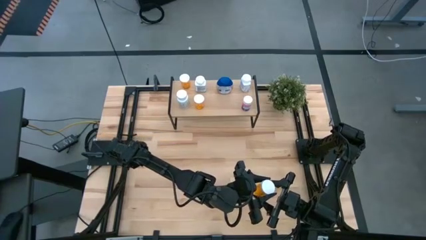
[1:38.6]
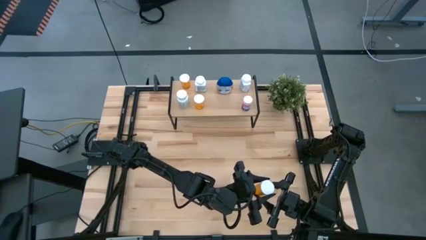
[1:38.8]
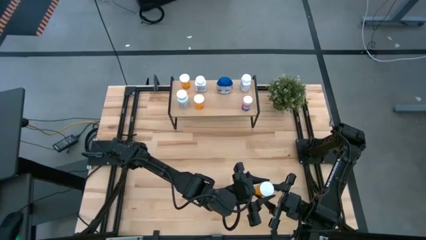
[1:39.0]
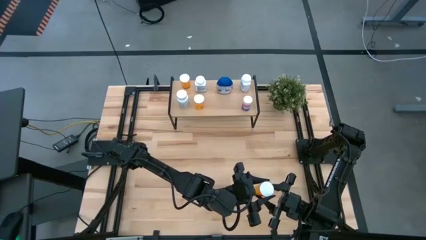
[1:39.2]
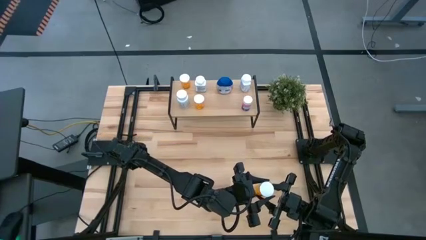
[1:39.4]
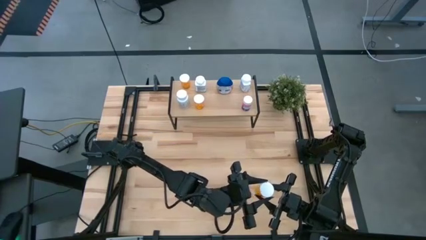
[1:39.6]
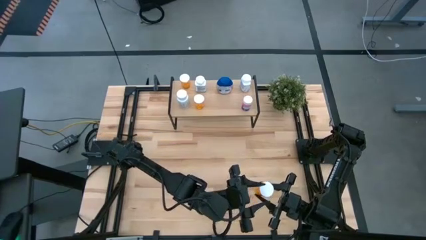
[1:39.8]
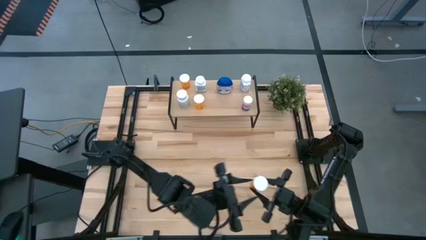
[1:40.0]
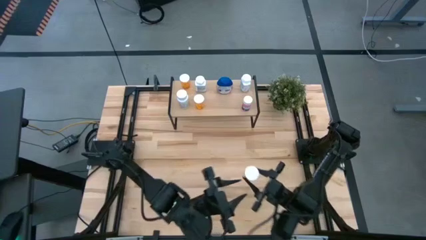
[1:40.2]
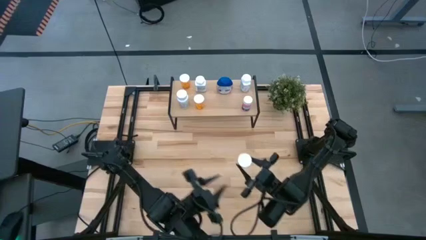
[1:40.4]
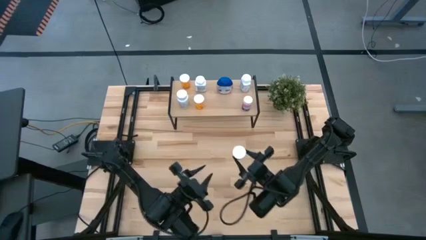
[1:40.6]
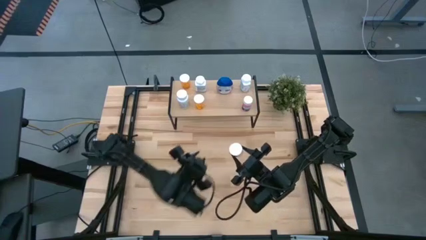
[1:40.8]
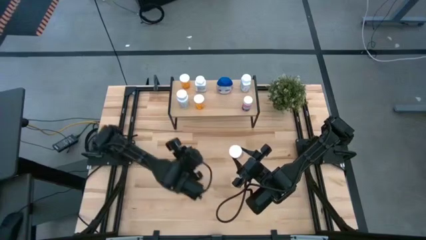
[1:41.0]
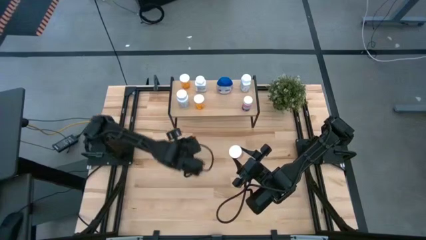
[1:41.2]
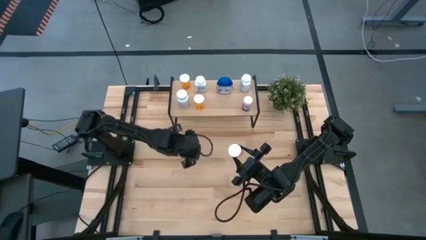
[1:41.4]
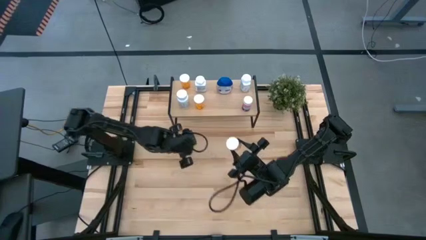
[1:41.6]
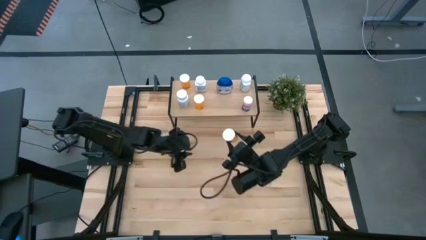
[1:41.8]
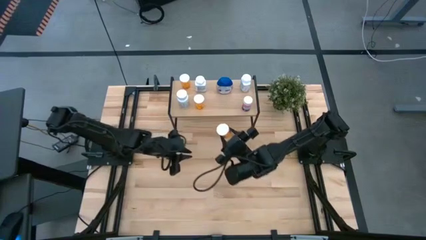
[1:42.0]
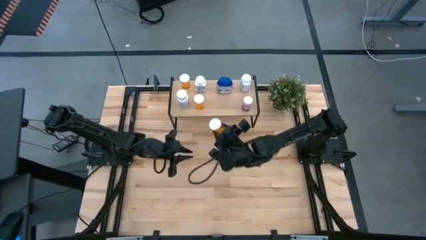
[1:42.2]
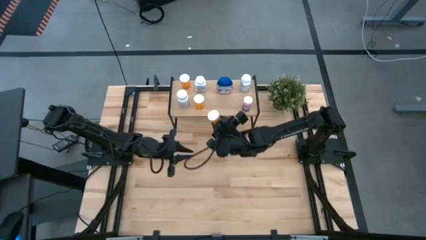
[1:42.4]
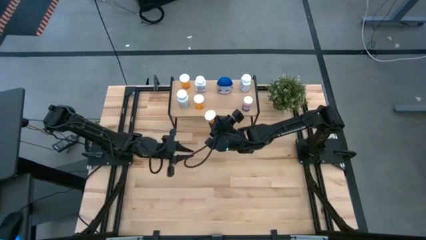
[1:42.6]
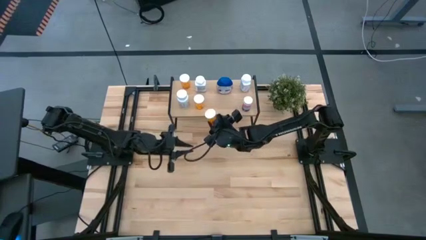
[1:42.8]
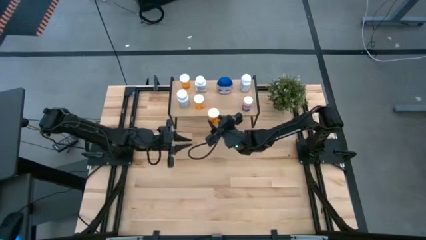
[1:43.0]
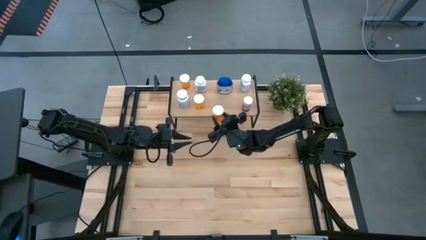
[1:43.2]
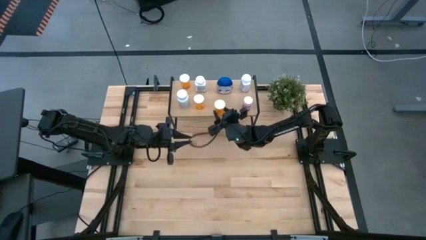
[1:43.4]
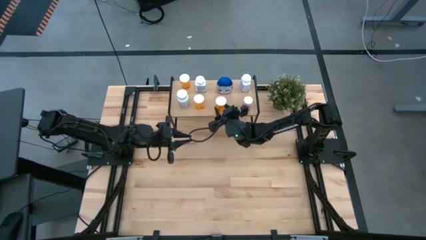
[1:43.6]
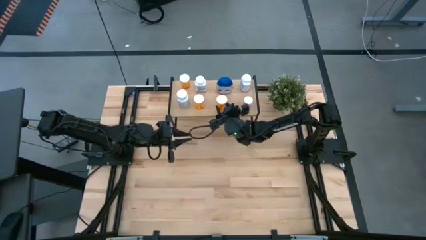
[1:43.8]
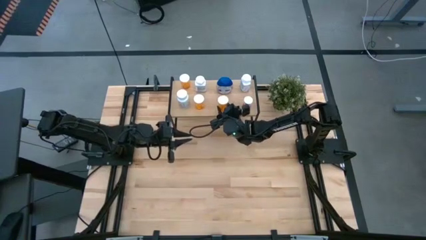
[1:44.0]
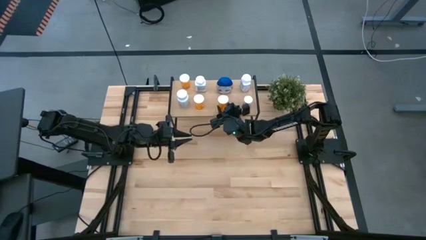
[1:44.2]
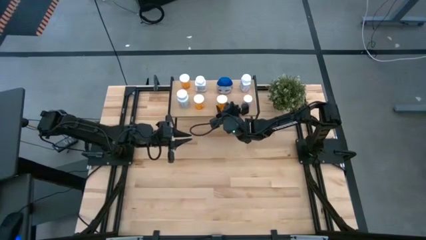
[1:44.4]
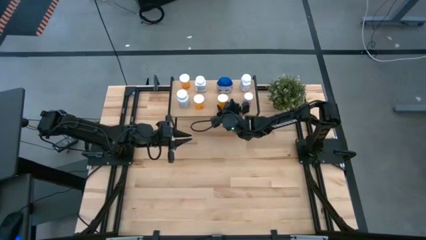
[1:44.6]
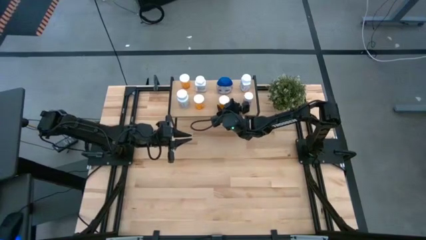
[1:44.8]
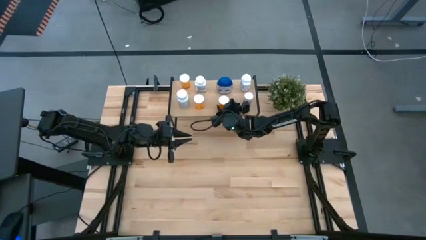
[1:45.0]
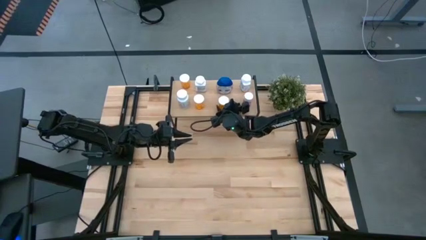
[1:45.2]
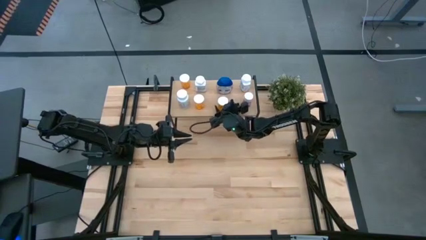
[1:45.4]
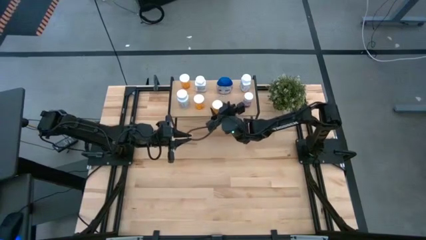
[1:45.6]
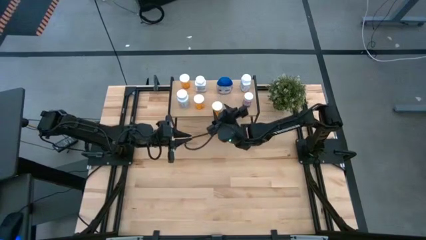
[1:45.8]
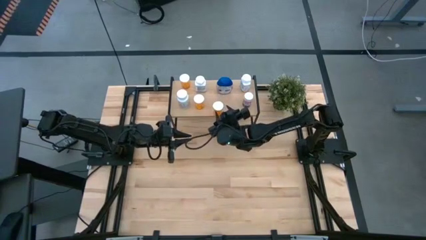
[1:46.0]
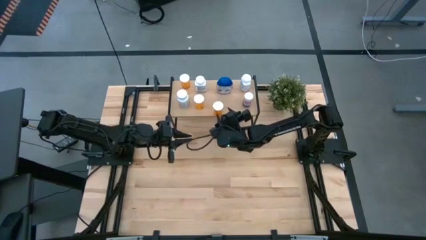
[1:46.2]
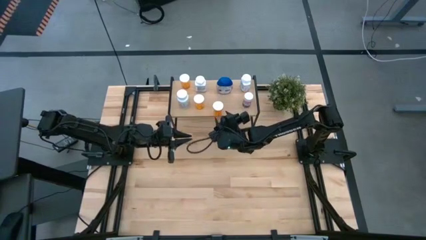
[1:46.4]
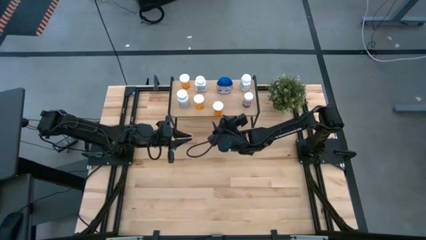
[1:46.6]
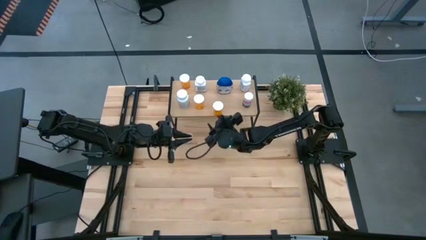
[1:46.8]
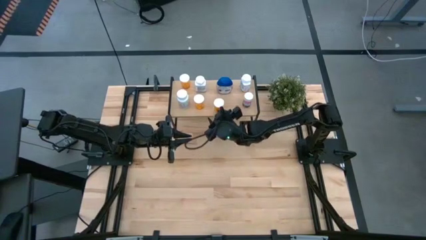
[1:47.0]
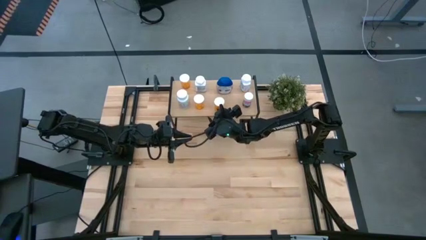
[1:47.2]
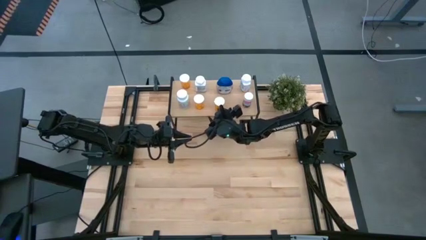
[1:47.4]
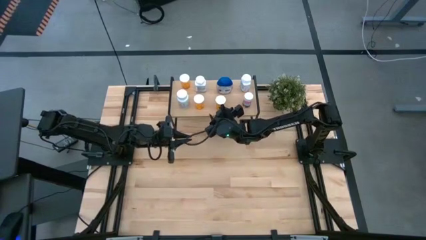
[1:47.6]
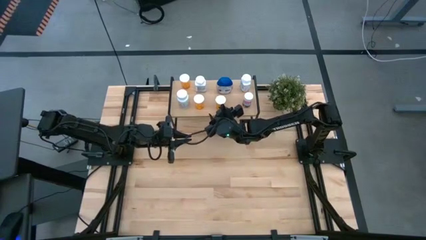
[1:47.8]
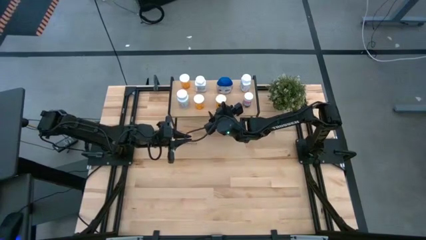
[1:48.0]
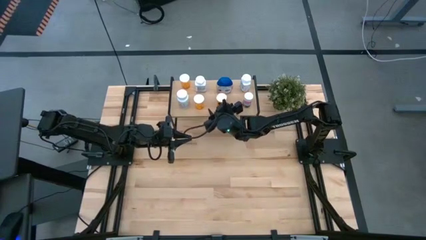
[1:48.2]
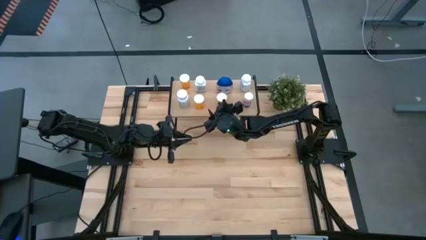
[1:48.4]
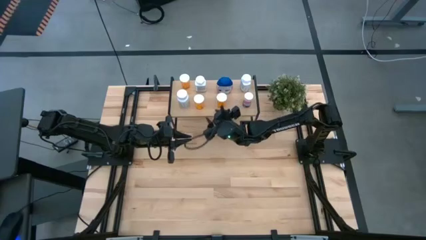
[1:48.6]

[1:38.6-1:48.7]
Task: Pick and place medicine bottles onto shelf by color
Put the yellow pill bottle on the shelf

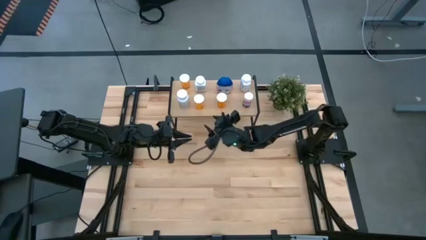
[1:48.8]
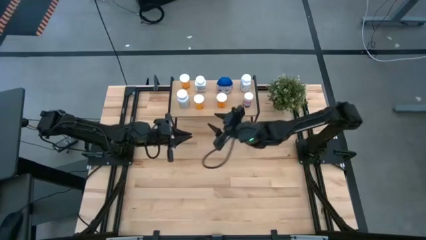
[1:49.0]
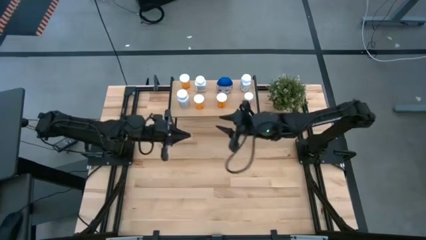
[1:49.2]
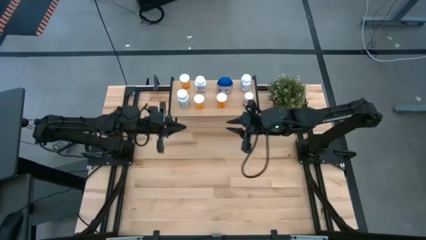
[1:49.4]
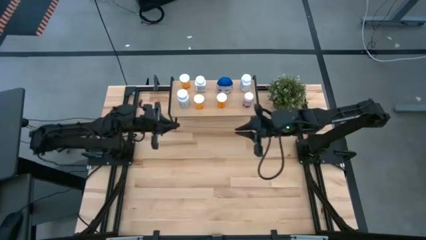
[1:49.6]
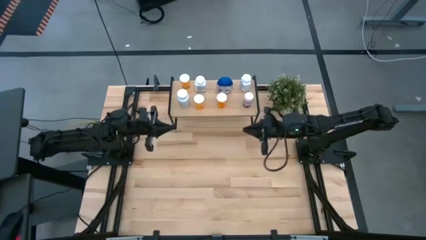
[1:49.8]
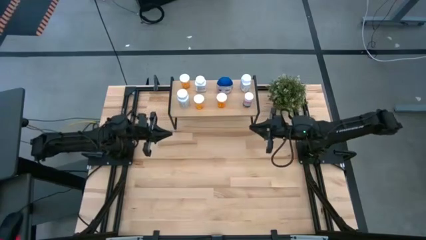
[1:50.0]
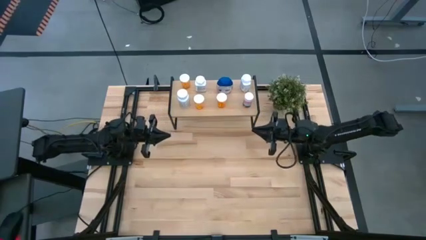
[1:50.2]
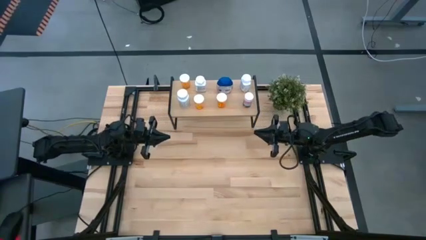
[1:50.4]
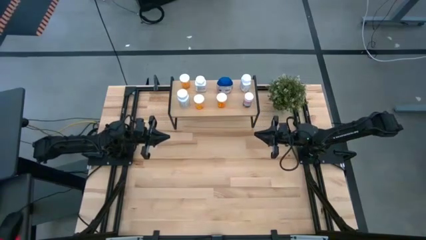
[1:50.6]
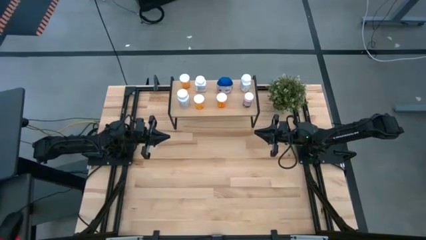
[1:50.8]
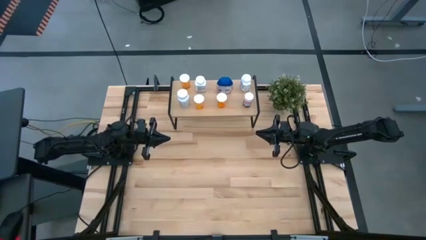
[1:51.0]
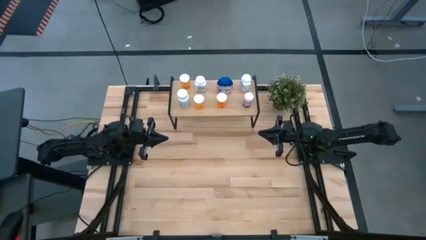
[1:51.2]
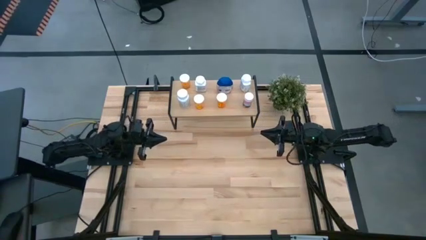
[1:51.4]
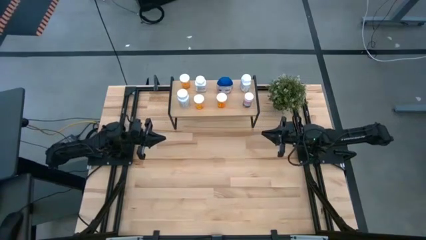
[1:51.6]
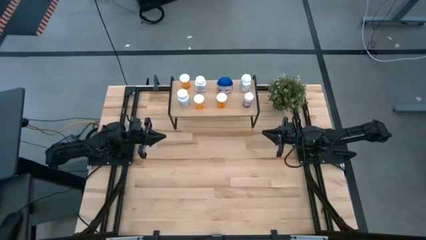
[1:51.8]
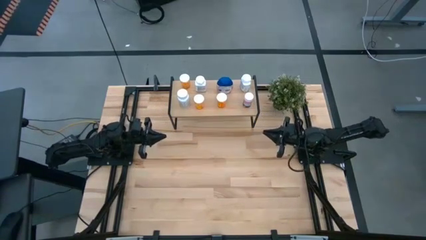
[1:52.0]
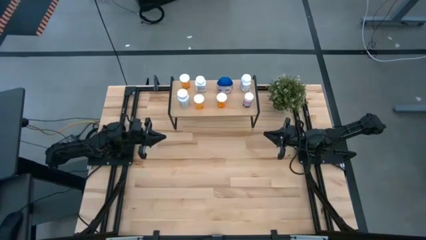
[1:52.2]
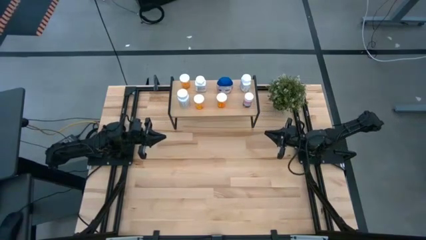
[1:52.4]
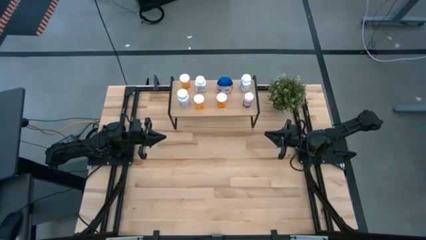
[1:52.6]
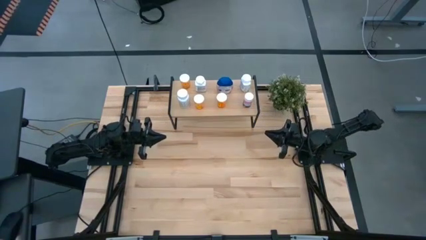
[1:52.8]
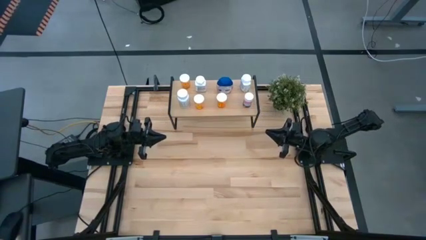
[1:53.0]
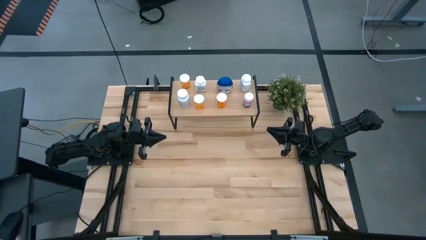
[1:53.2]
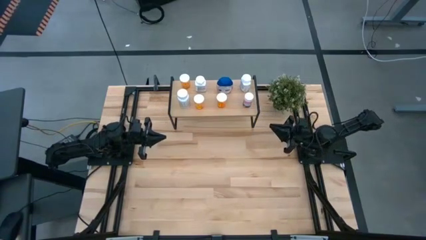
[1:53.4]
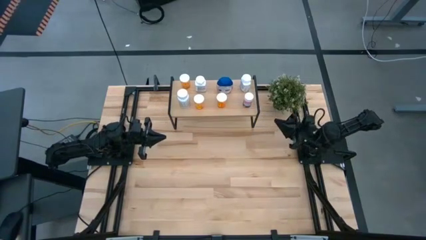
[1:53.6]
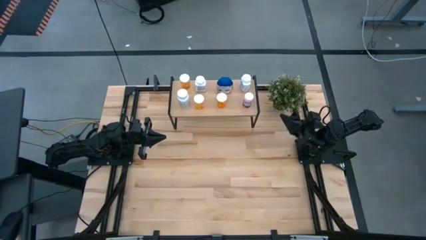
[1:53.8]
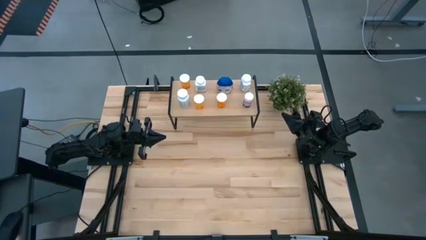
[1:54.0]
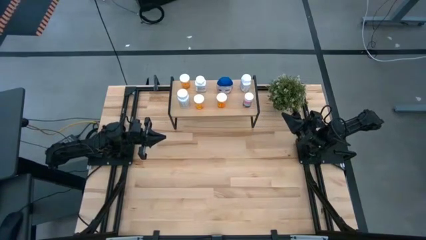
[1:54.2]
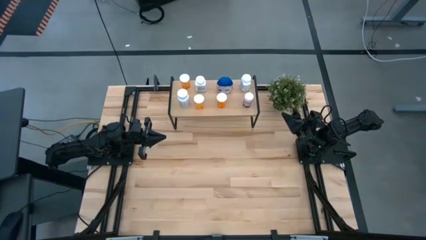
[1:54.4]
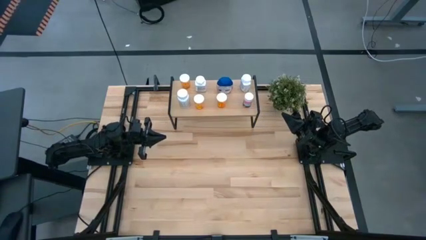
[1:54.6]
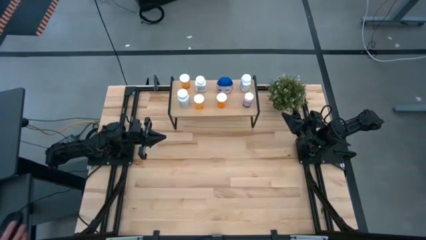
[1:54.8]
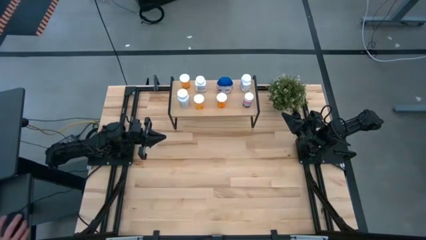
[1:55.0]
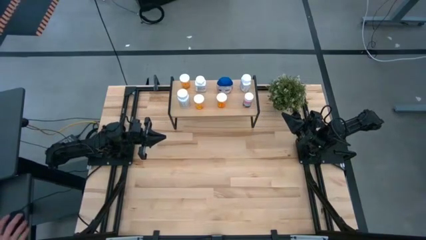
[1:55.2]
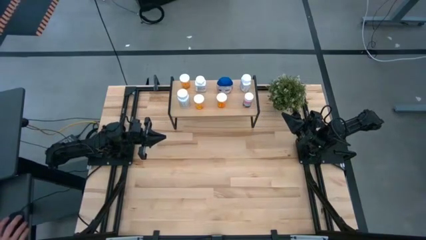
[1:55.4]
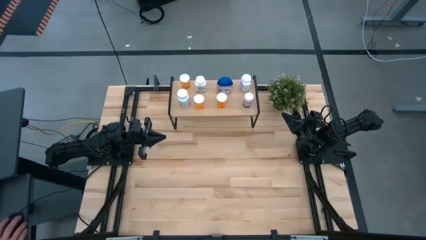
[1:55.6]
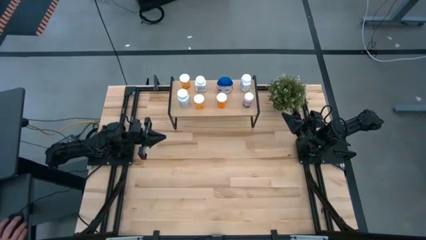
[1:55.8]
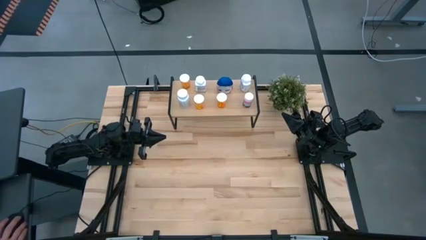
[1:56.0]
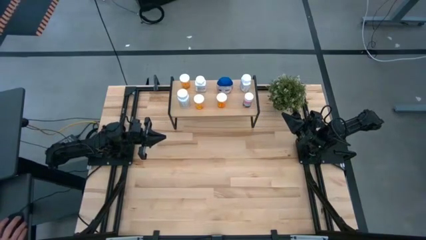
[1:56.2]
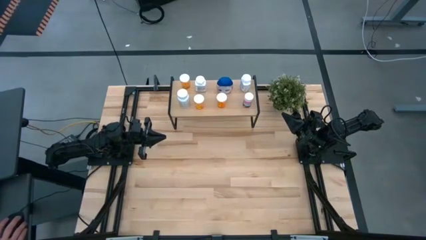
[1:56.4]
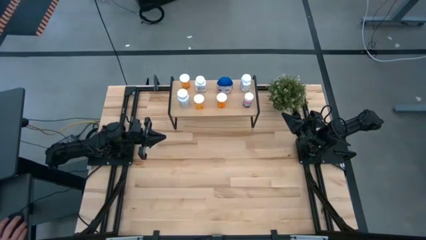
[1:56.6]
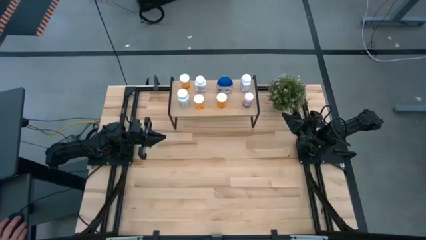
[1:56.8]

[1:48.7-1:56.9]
Return to Home Position
